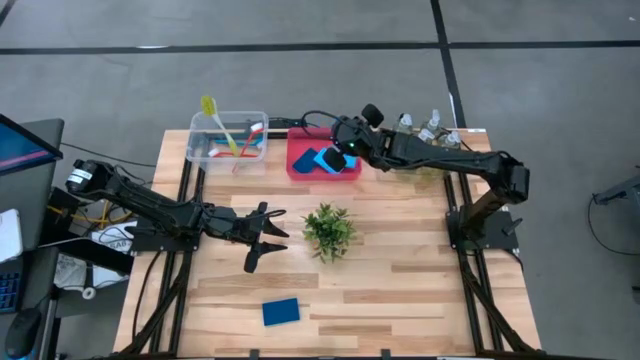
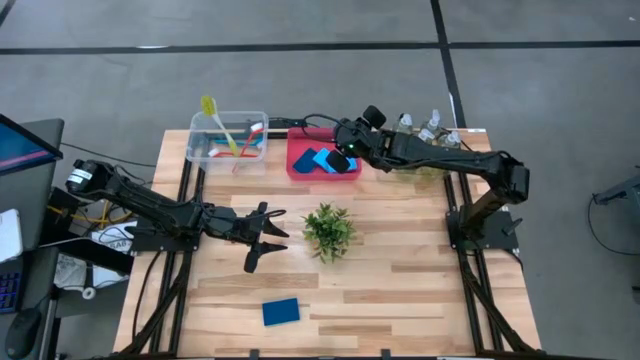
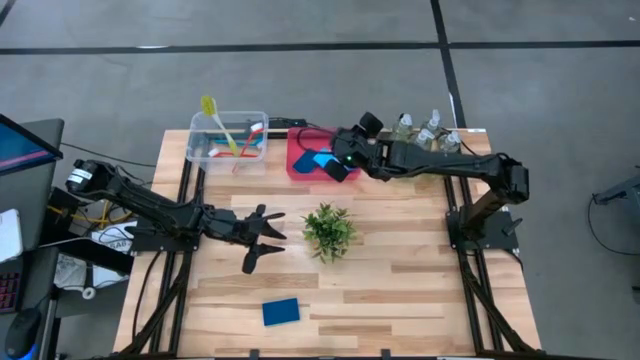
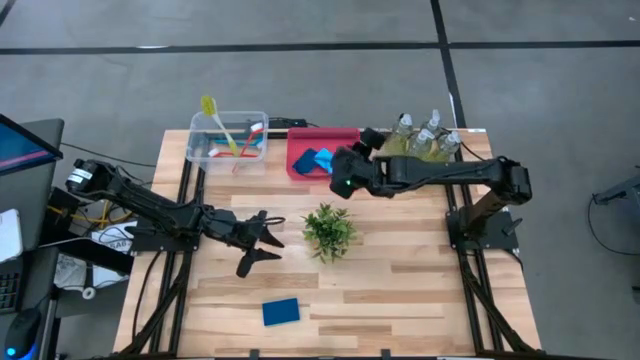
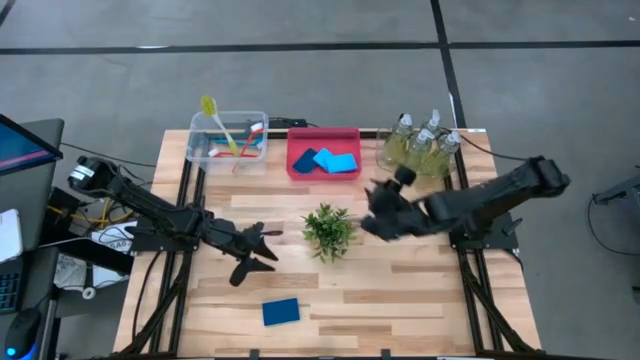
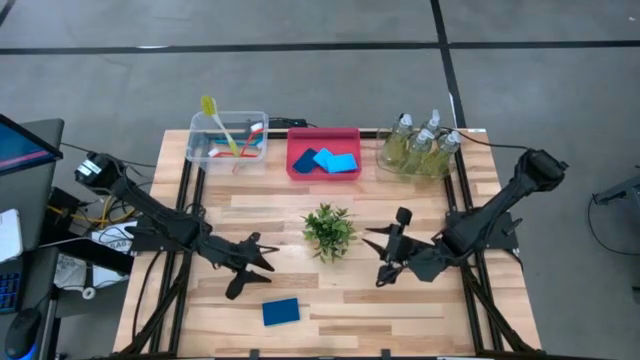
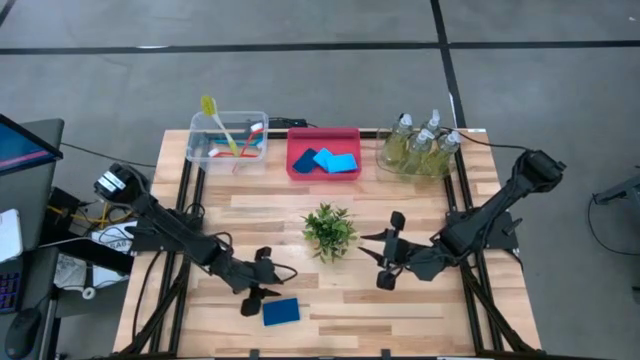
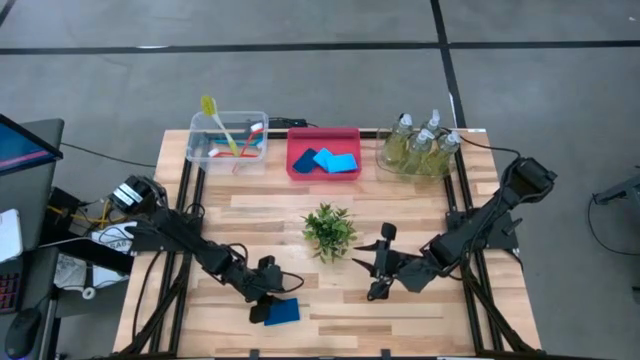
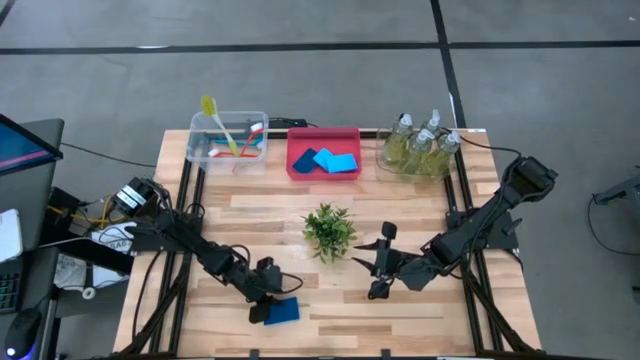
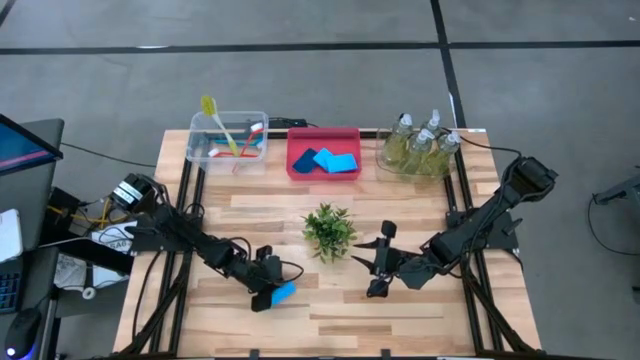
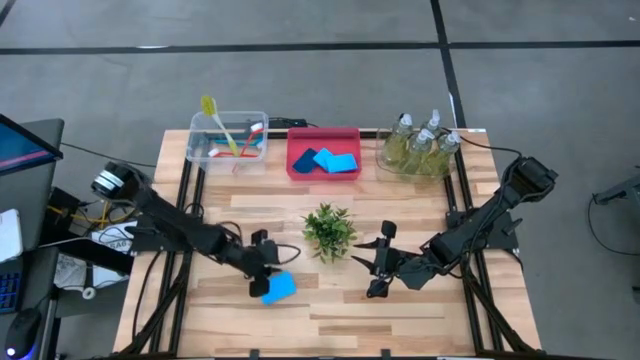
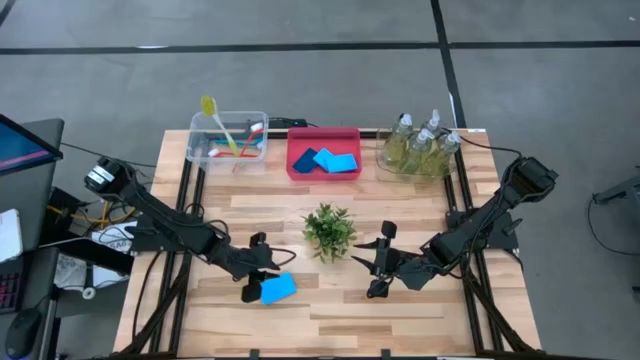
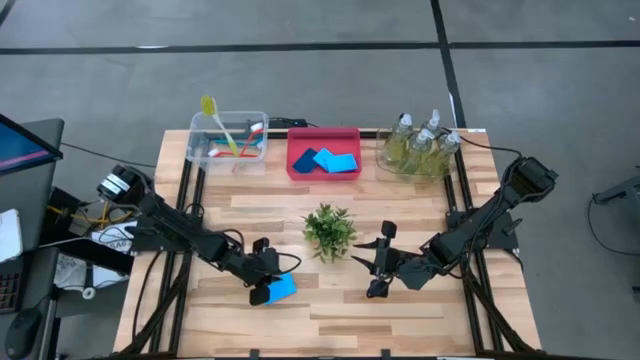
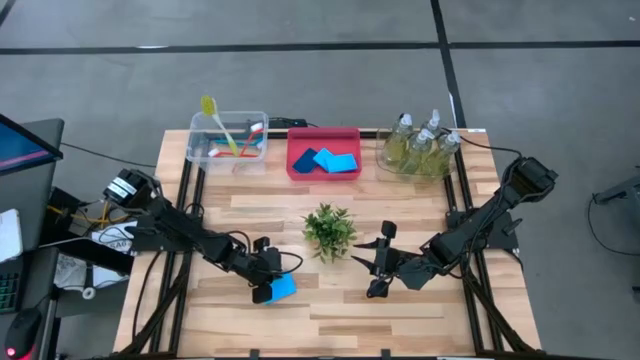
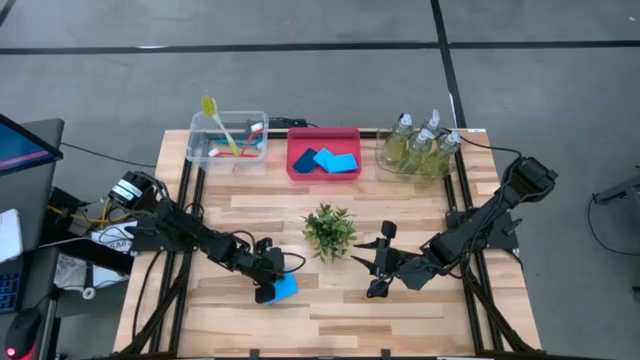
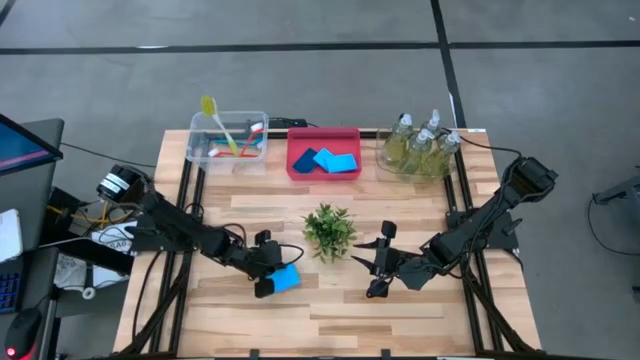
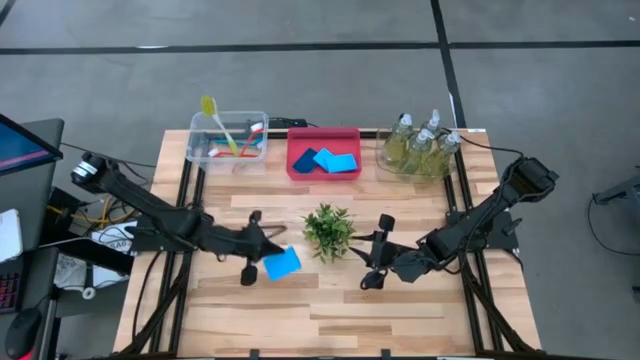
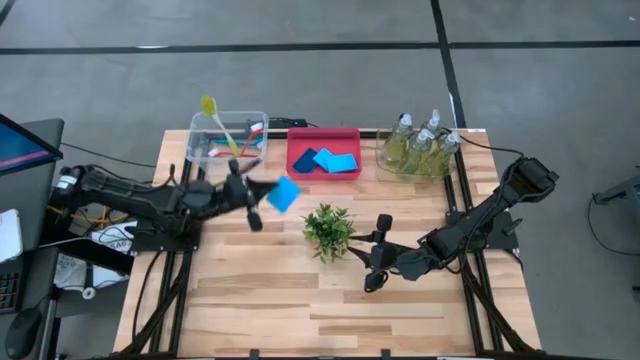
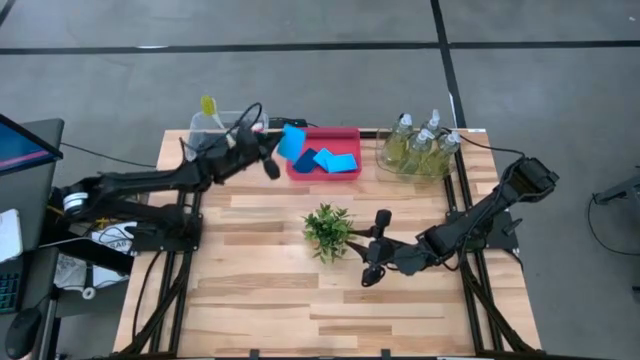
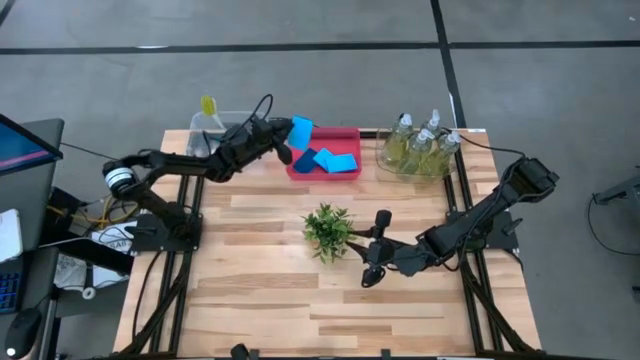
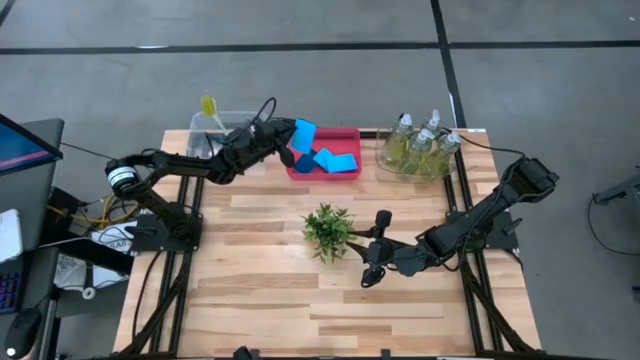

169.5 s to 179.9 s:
Task: Pick & Place Kitchen Sink Supplies
Put the blue sponge into the red bin

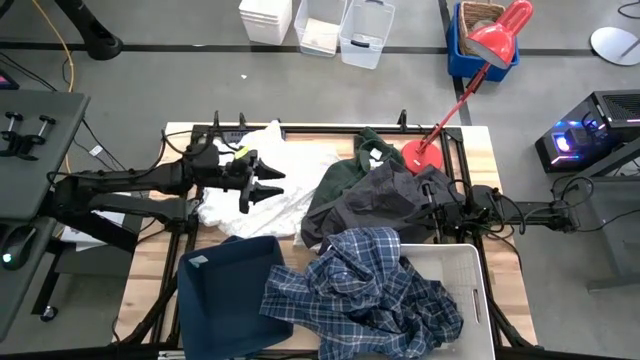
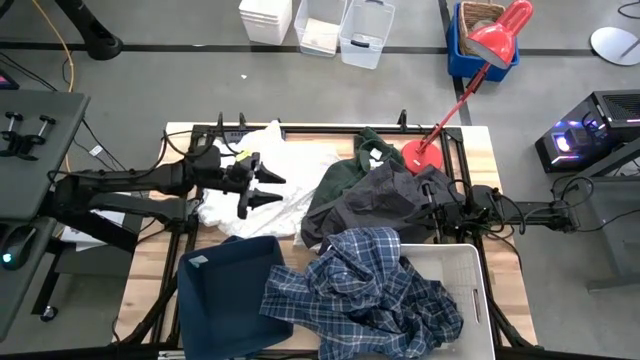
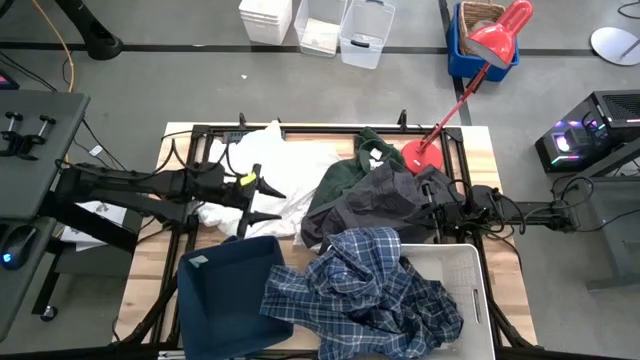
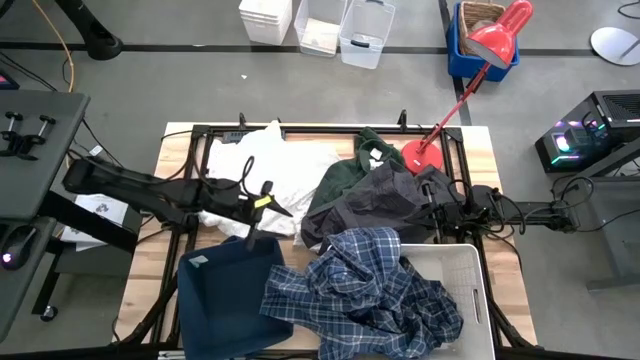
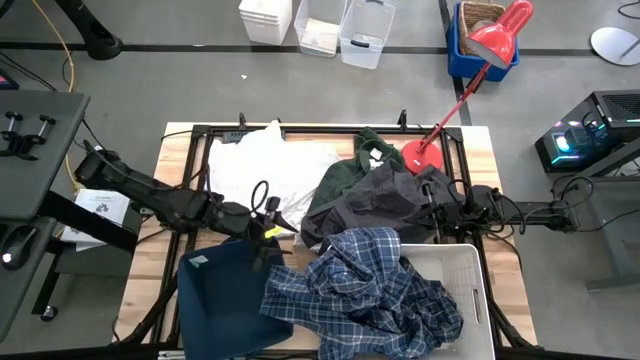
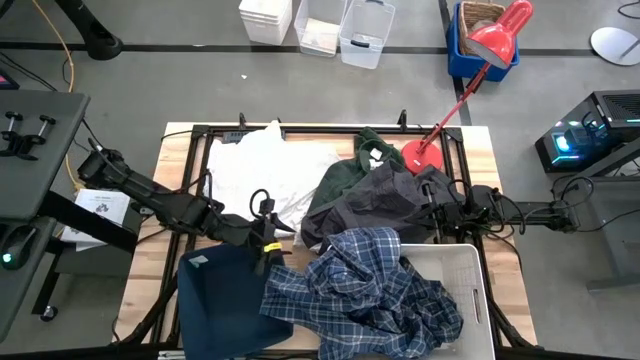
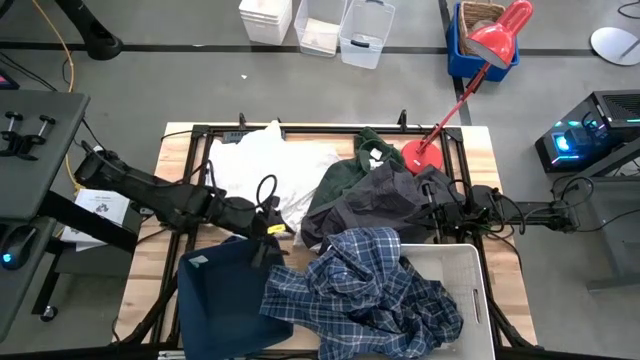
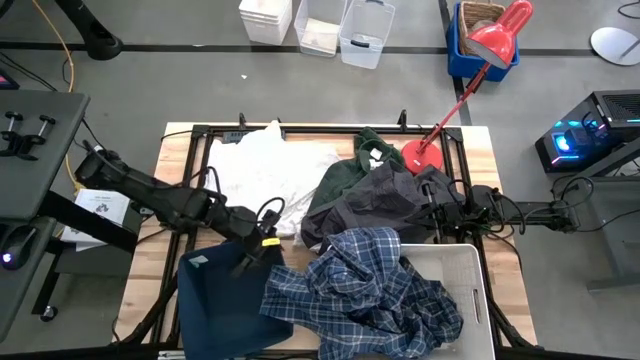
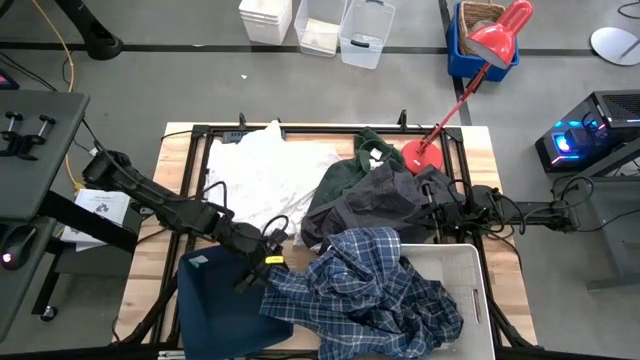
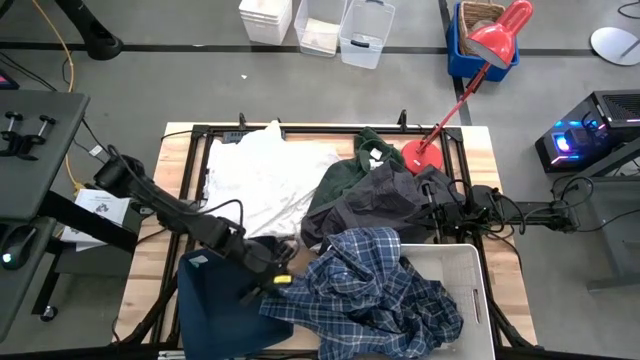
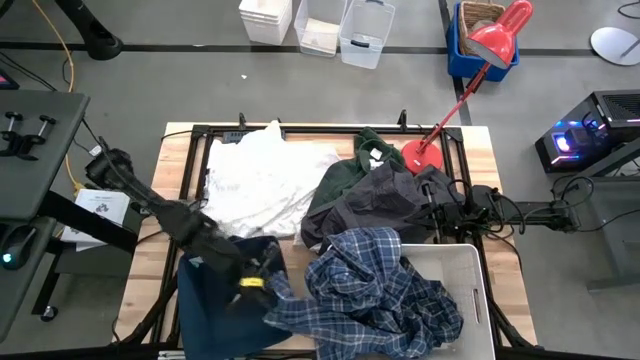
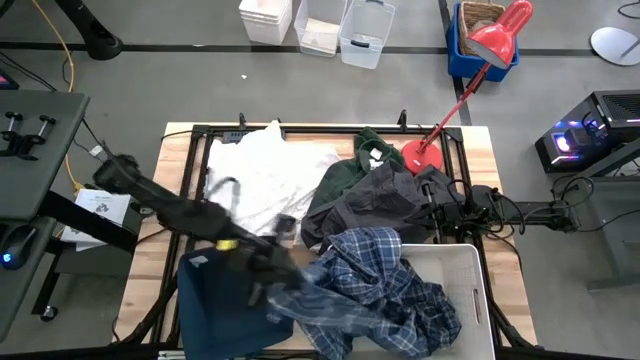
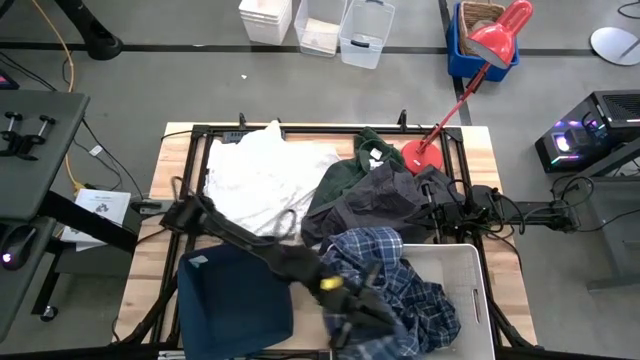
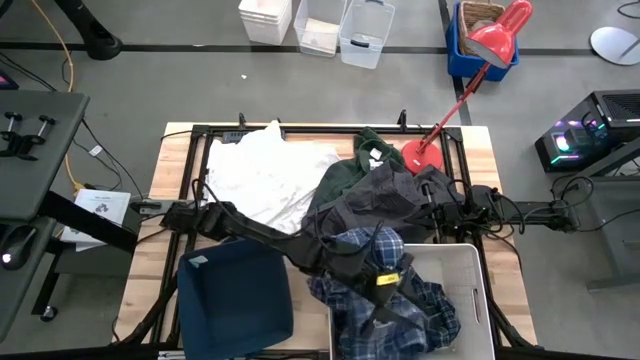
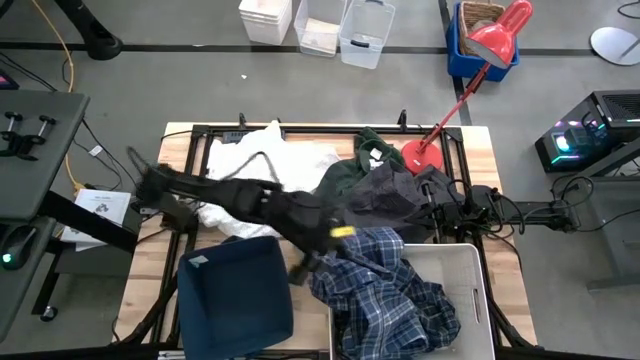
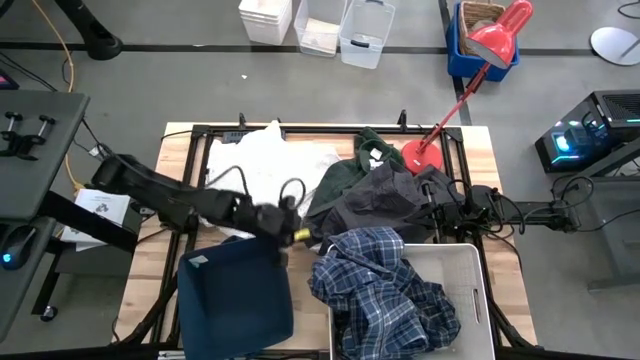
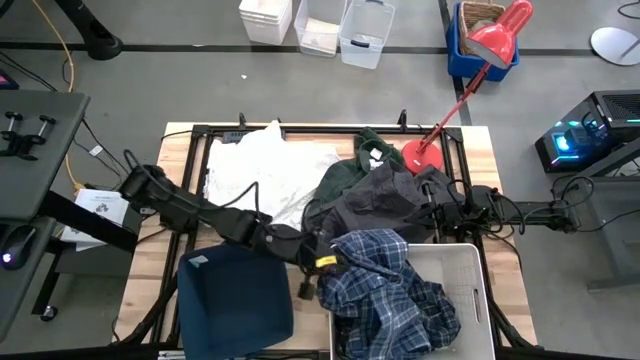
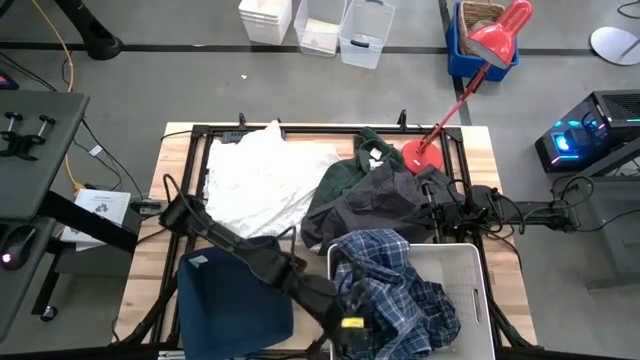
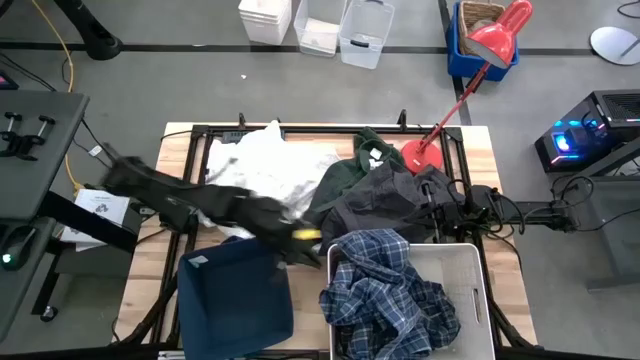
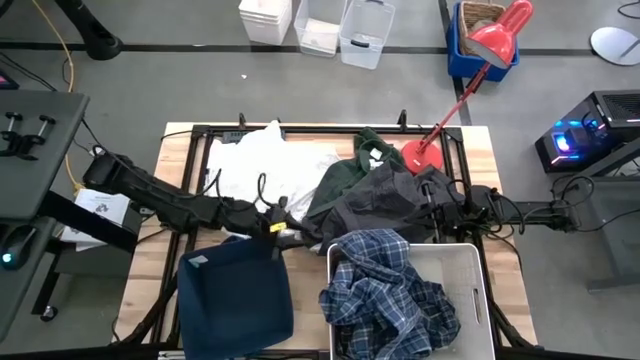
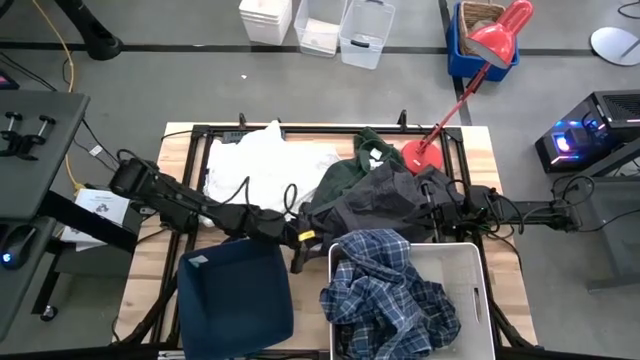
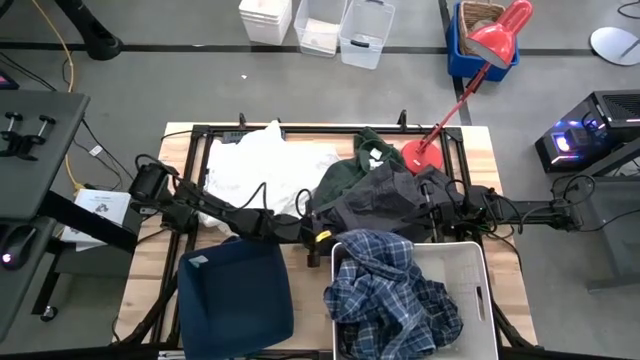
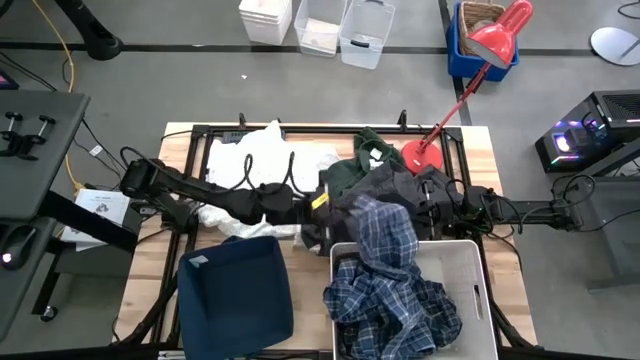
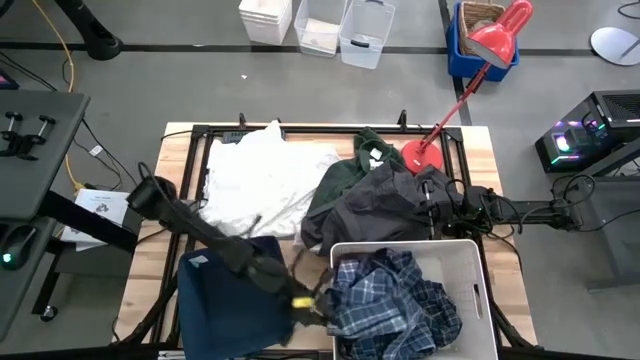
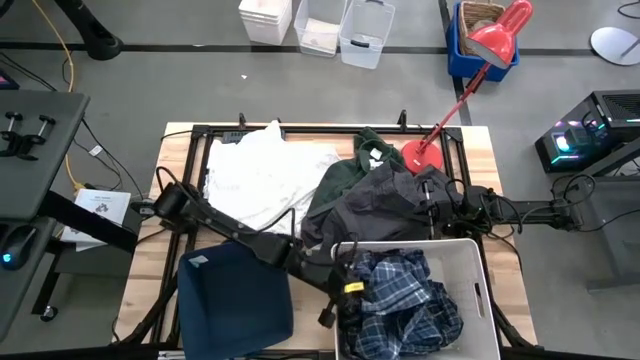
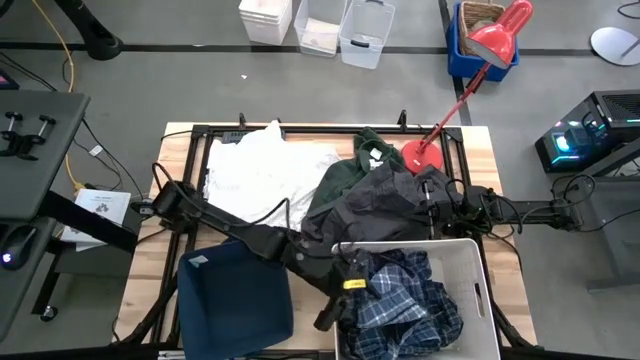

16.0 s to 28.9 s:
Task: Sort clothes
Put the blue checkered long-sleeve shirt into the white laundry bin
